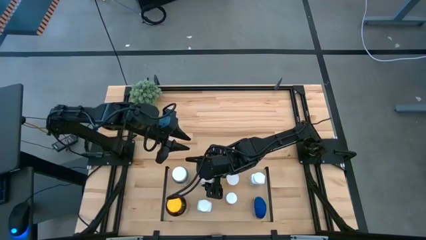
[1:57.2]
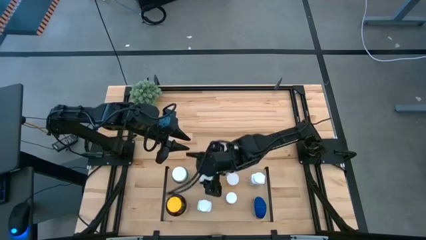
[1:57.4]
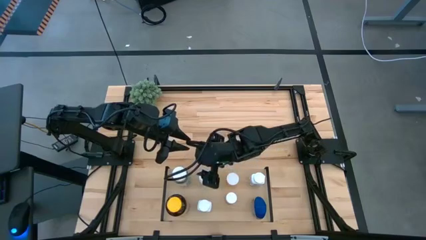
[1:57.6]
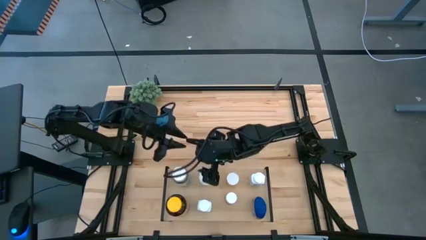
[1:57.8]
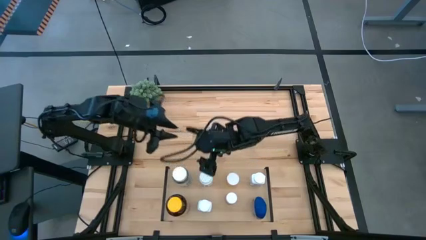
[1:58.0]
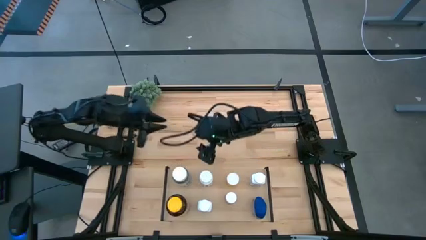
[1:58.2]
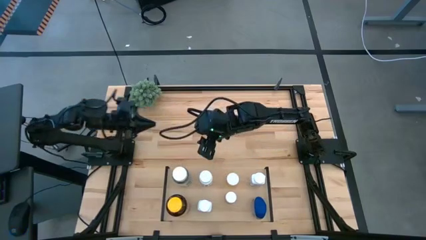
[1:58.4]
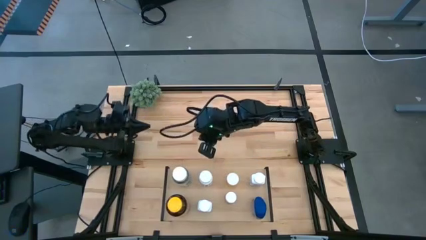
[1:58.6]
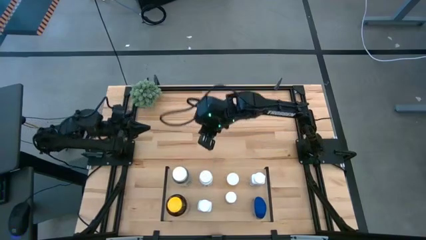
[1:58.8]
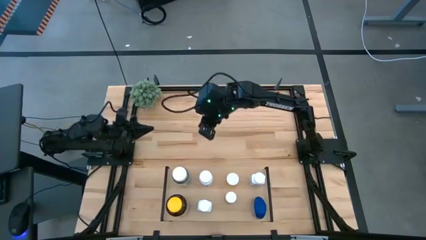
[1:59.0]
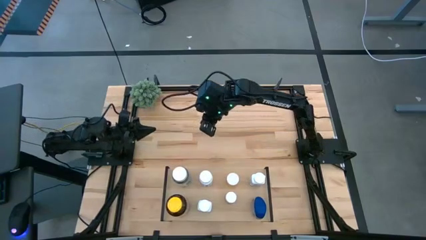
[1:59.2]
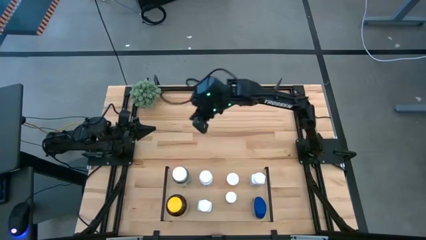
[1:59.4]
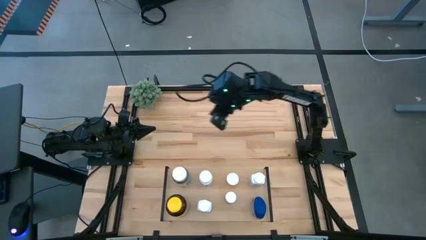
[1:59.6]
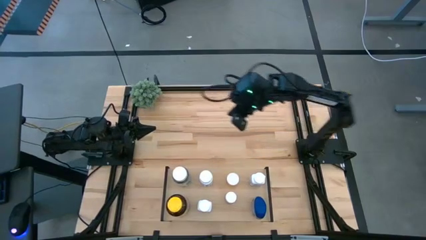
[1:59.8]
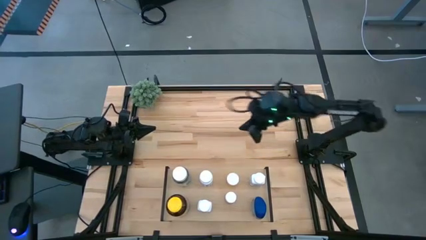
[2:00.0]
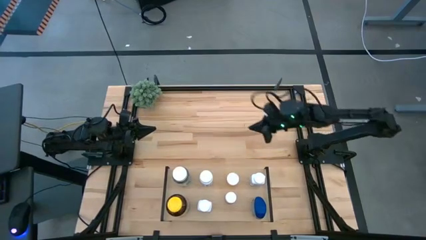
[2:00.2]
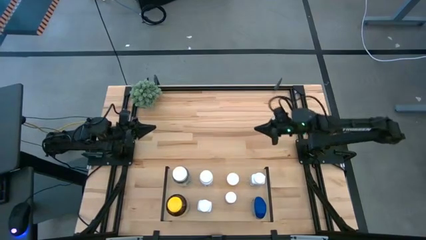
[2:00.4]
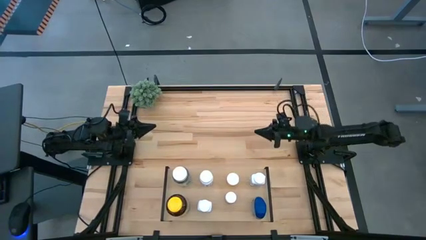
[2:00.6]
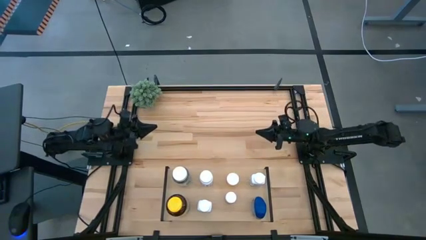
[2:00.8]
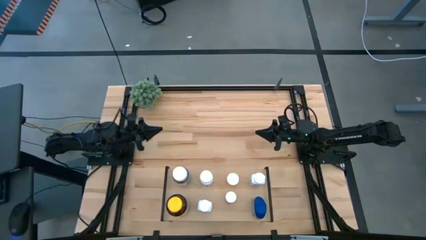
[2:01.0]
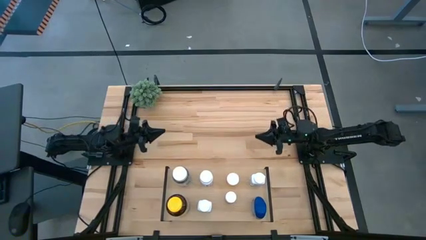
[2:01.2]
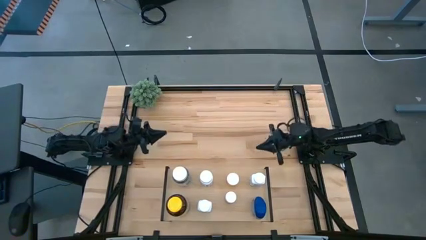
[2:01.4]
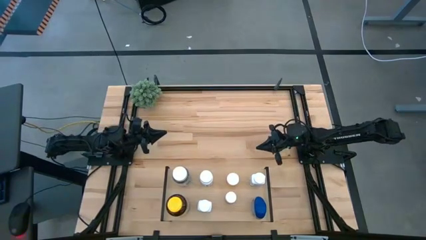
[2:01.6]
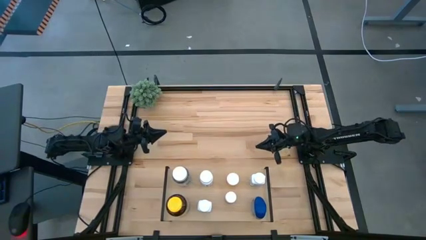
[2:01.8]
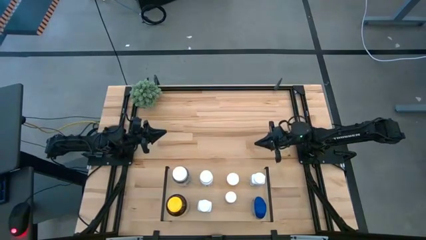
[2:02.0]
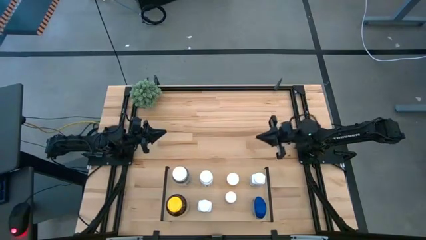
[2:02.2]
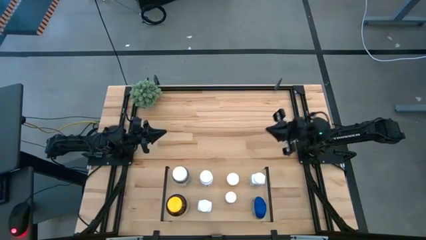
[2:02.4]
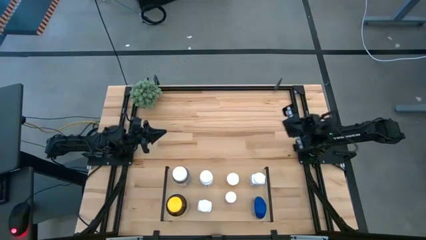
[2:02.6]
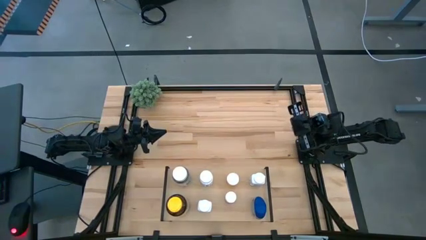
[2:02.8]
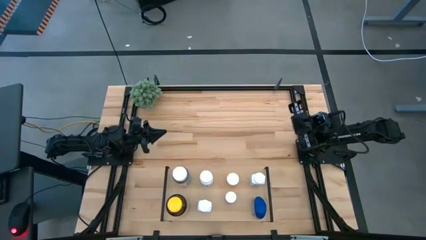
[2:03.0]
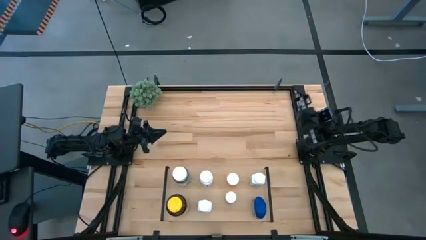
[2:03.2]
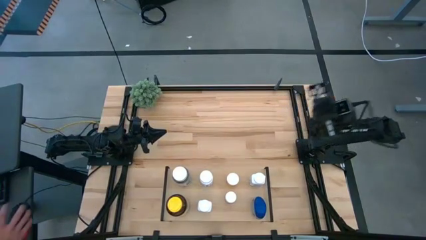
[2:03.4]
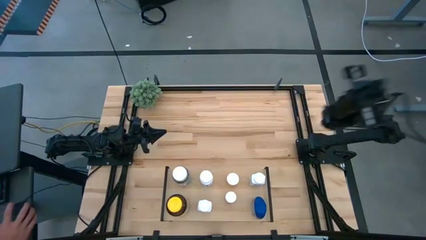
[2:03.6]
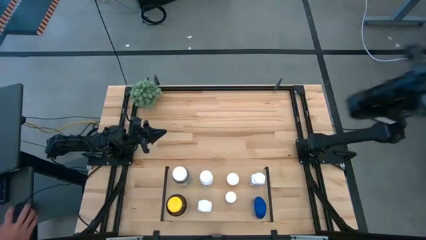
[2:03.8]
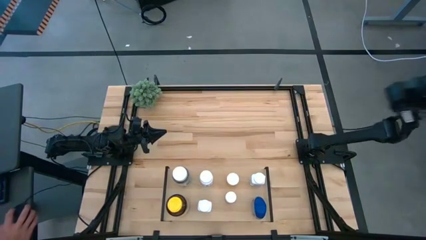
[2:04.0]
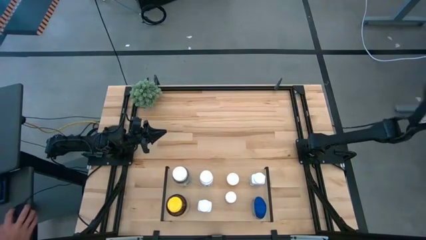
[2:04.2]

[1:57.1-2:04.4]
Task: Pick and place medicine bottles onto shelf by color
Return to Home Position

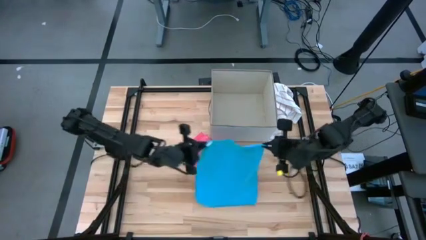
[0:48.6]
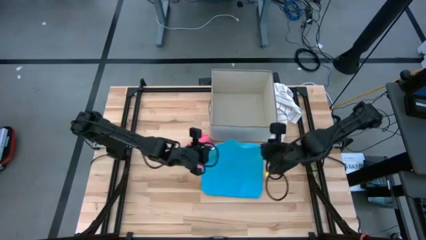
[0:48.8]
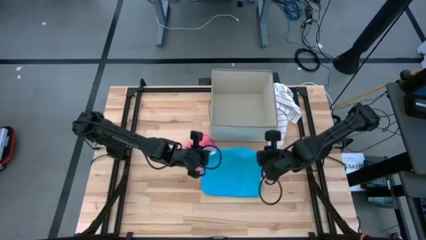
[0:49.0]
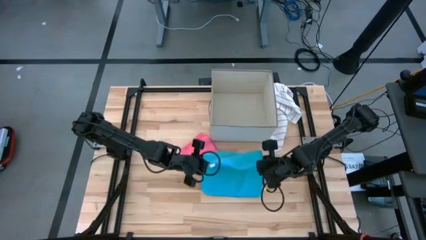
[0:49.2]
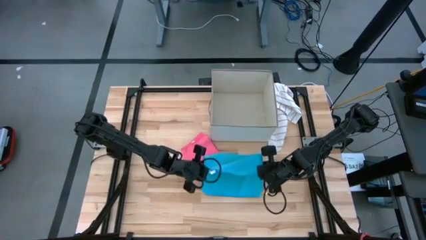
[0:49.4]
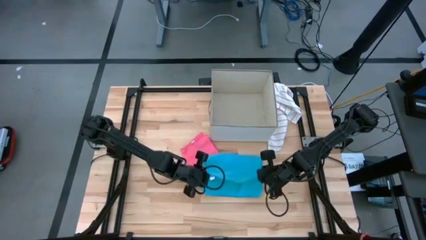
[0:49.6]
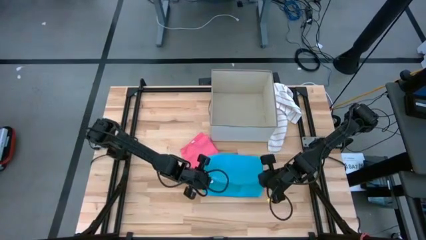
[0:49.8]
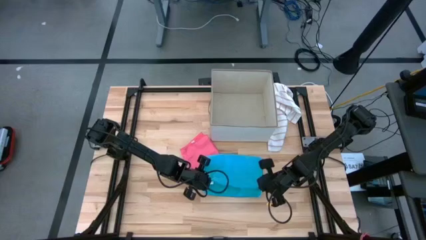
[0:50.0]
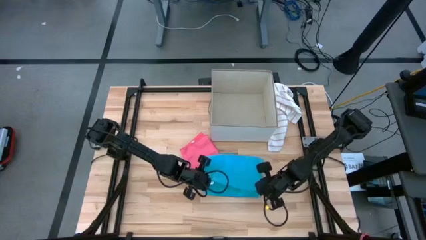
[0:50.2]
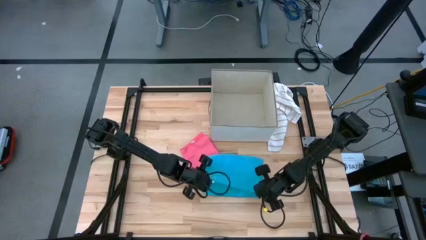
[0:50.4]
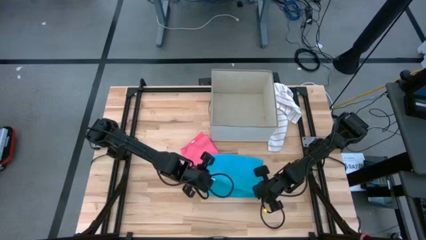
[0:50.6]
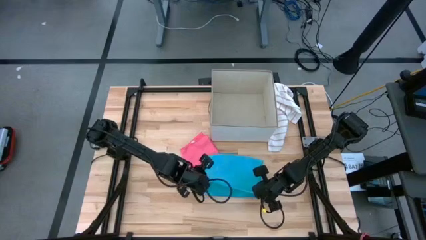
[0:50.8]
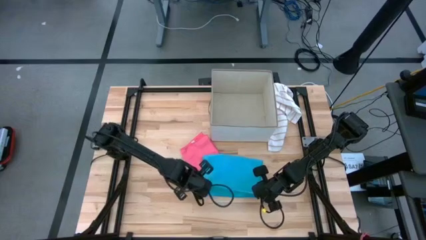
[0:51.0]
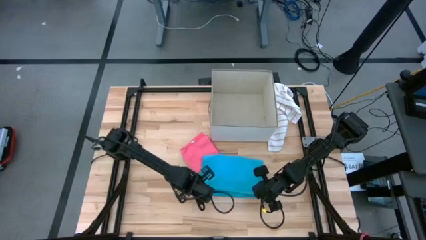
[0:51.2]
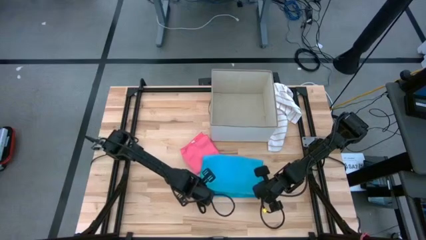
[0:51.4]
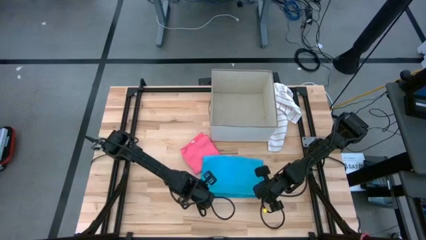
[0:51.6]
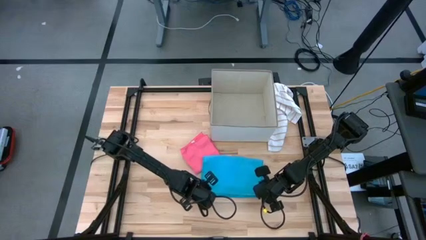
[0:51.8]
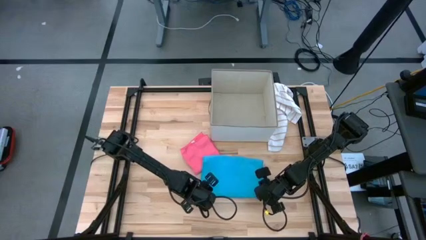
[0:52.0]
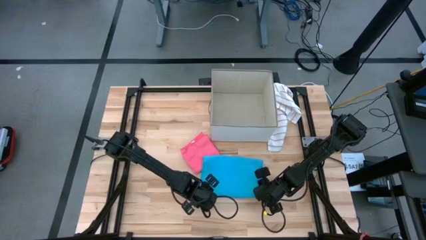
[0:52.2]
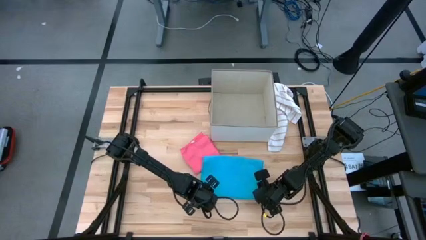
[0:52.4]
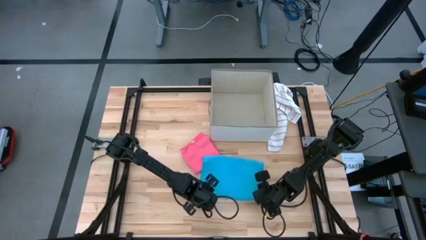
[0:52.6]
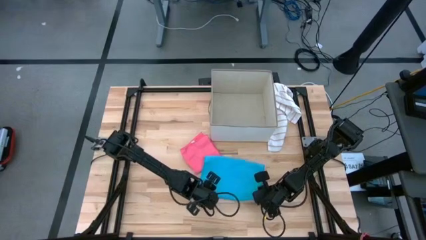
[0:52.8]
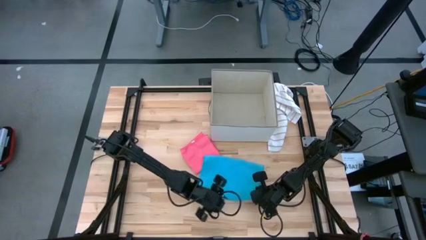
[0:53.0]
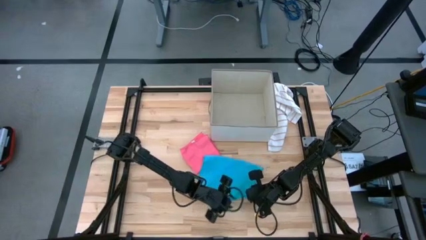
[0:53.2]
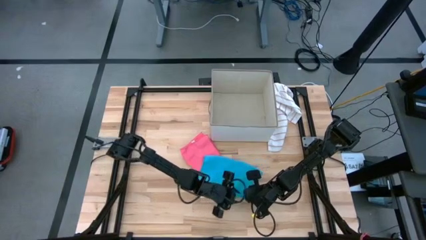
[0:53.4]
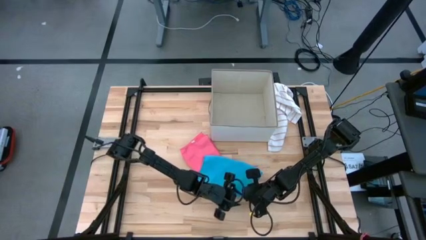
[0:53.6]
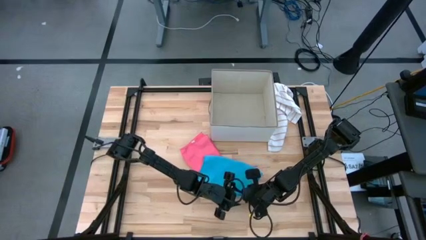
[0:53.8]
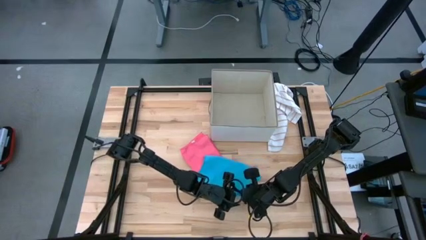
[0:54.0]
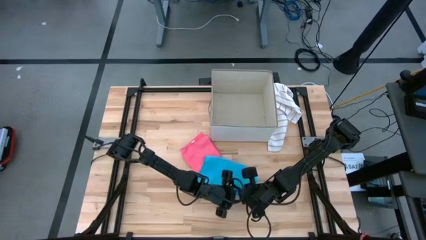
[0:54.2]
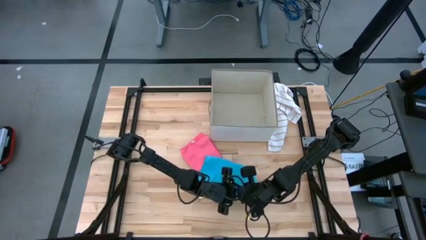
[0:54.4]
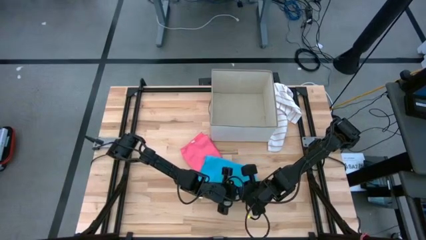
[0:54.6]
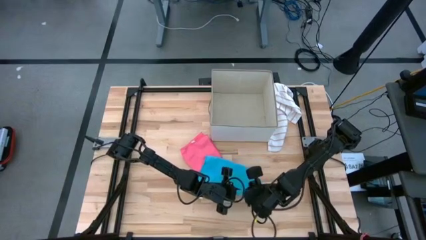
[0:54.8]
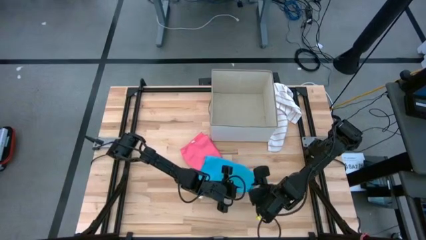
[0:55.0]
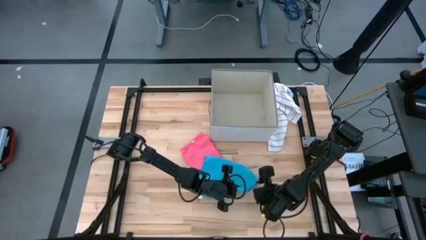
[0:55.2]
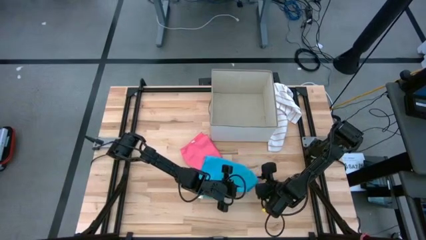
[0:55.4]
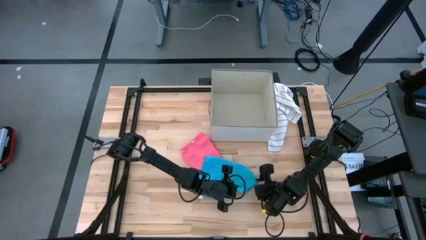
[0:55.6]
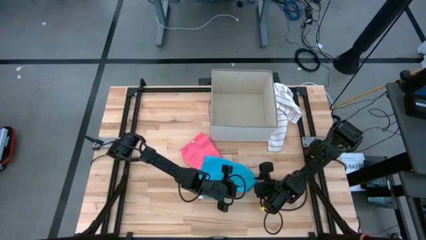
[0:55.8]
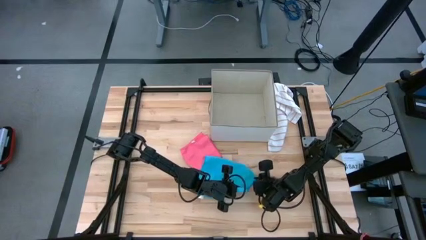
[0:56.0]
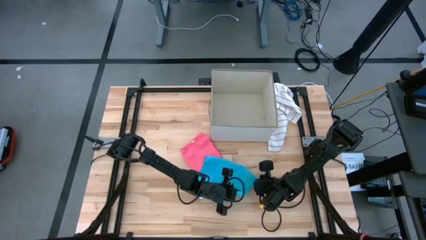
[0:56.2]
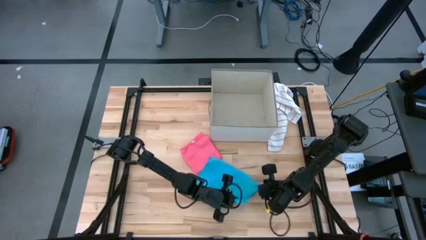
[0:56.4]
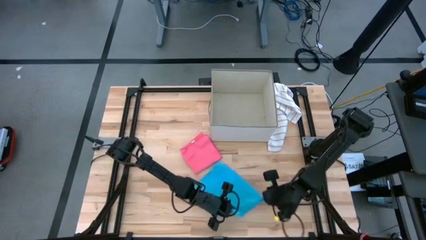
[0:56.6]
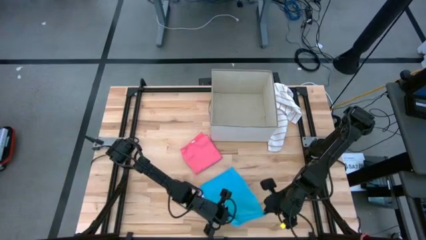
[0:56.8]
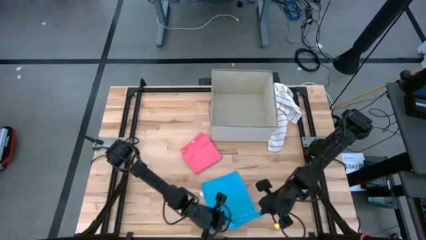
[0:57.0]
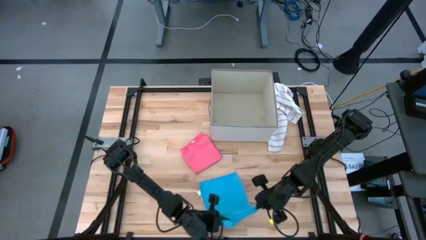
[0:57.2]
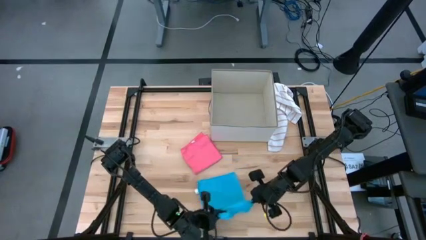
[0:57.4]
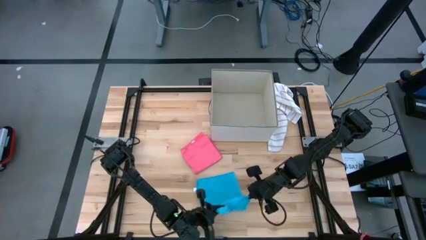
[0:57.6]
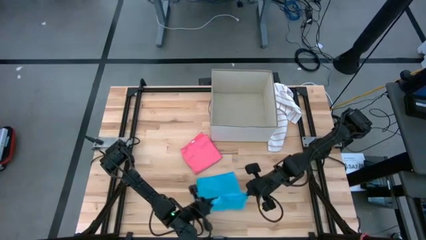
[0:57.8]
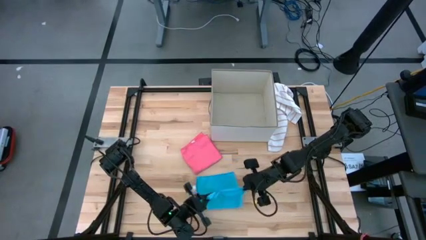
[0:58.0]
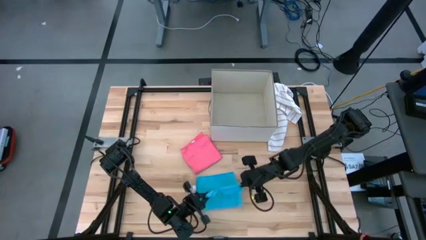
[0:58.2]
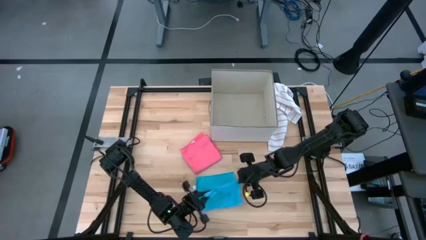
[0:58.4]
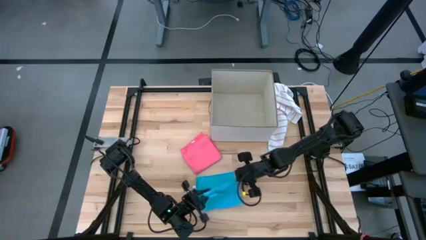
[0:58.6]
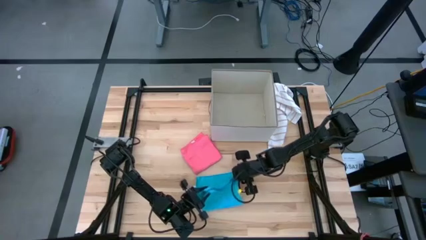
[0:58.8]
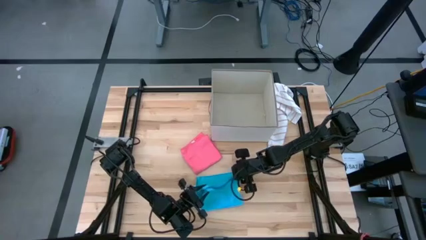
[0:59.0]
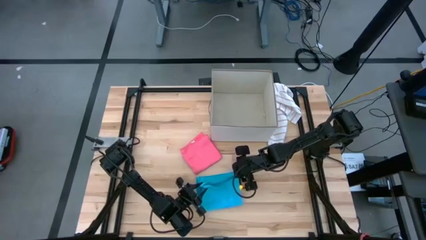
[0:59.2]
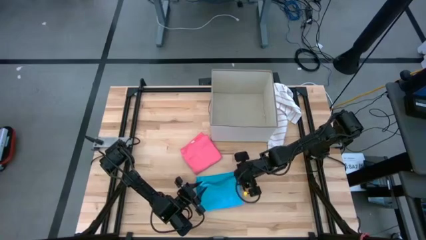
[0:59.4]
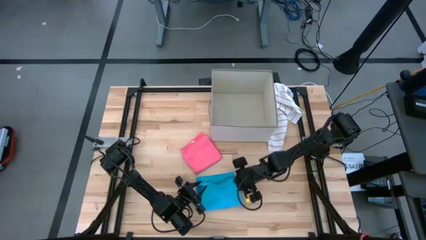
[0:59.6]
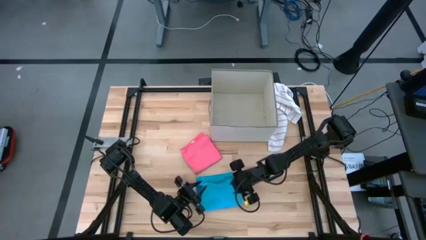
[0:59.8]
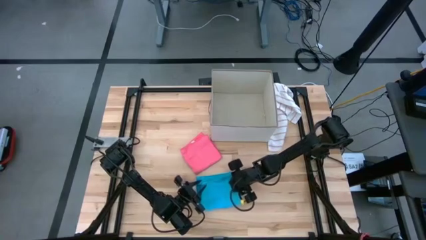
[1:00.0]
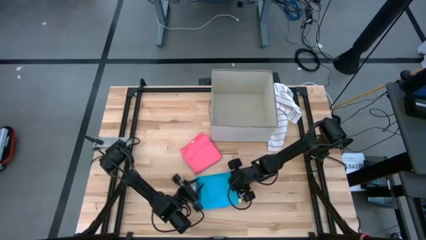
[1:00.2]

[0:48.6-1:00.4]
Task: Fold towel
Fold the blue microfiber towel
